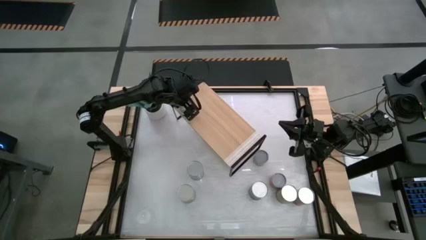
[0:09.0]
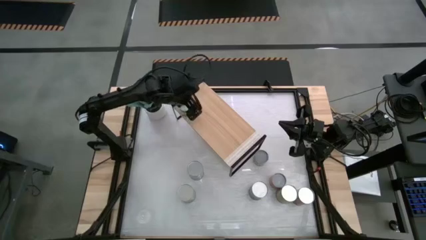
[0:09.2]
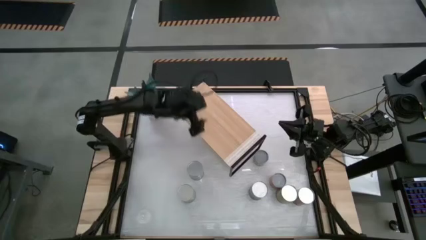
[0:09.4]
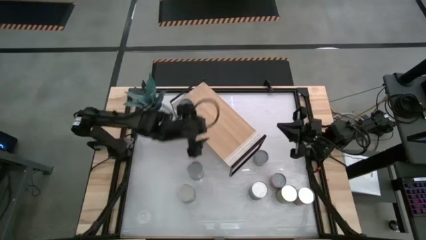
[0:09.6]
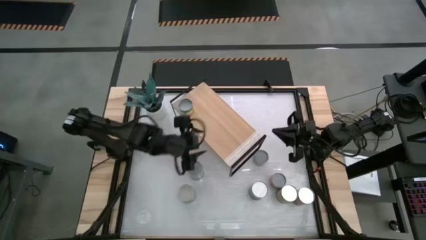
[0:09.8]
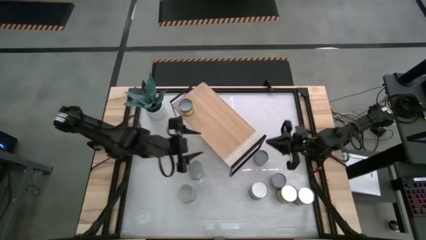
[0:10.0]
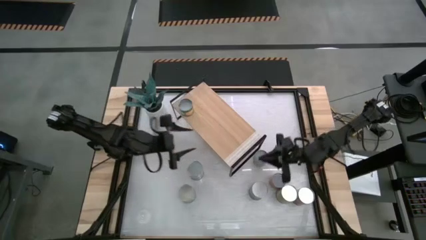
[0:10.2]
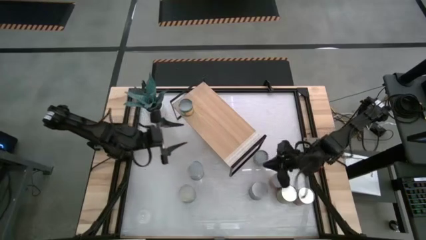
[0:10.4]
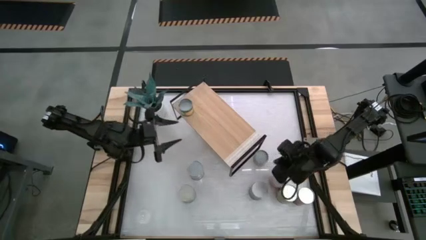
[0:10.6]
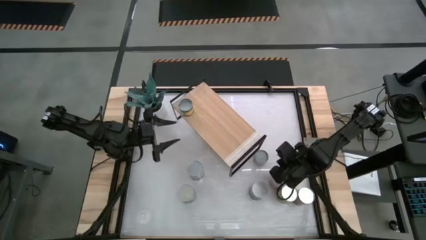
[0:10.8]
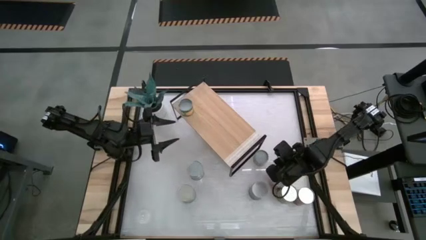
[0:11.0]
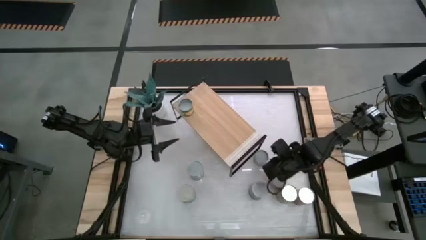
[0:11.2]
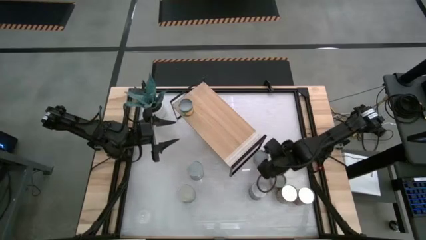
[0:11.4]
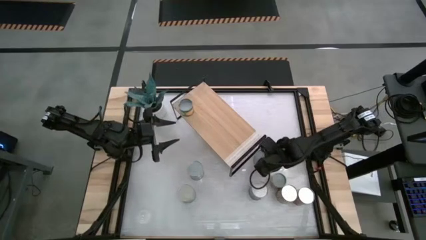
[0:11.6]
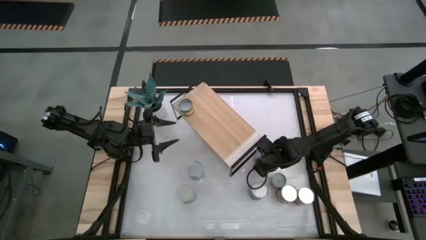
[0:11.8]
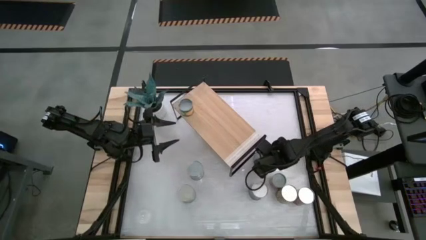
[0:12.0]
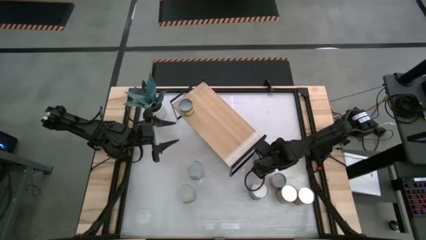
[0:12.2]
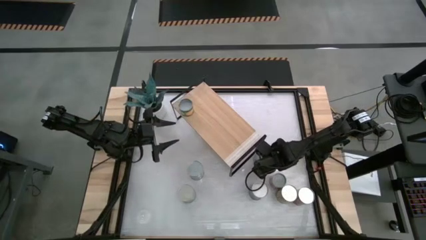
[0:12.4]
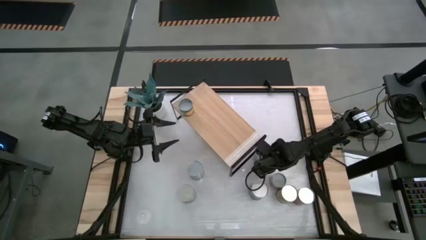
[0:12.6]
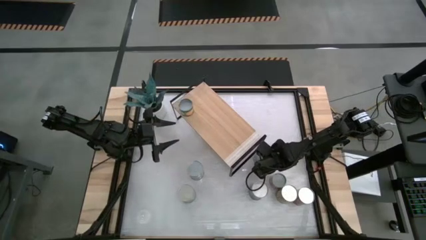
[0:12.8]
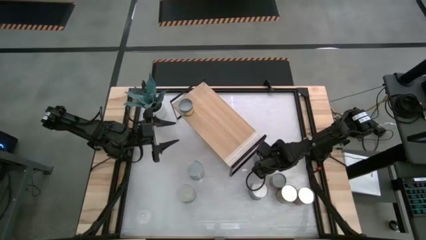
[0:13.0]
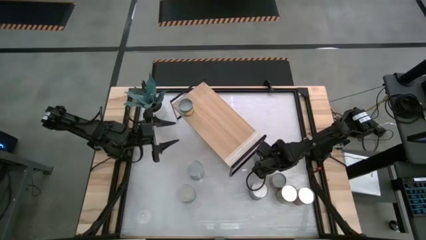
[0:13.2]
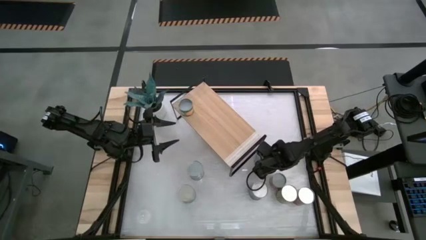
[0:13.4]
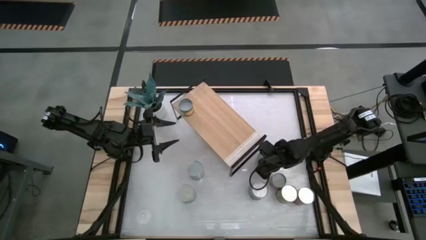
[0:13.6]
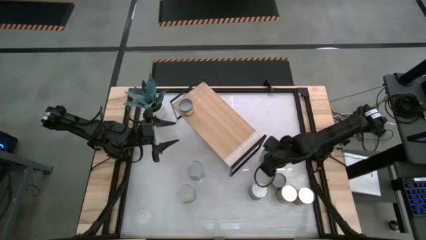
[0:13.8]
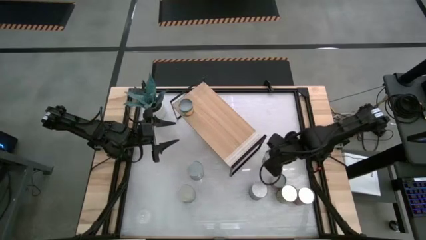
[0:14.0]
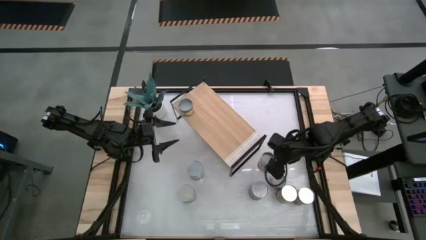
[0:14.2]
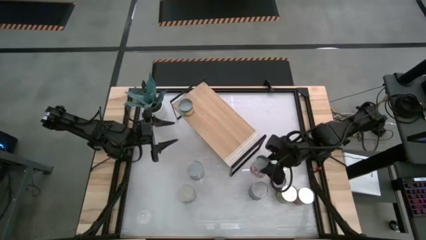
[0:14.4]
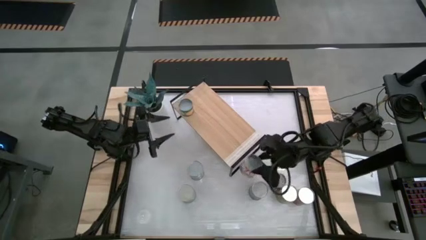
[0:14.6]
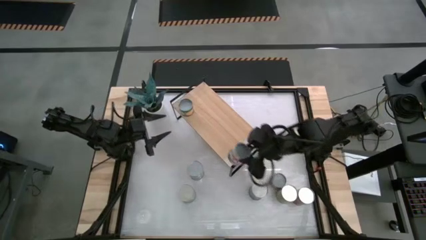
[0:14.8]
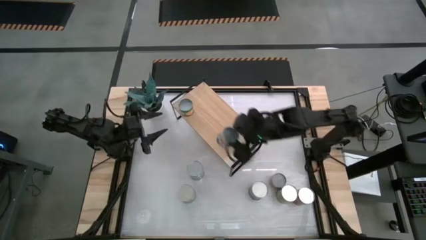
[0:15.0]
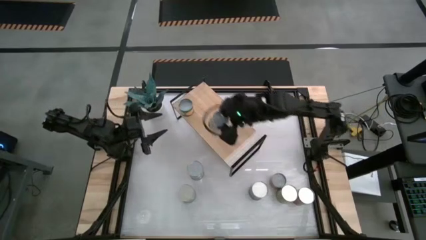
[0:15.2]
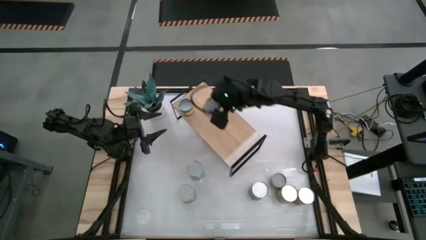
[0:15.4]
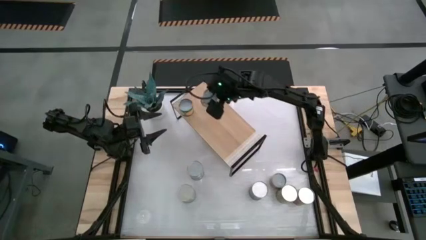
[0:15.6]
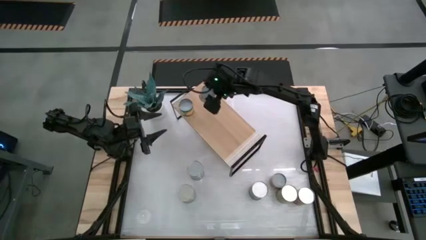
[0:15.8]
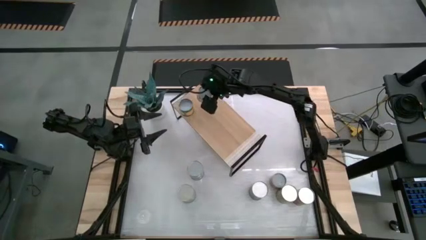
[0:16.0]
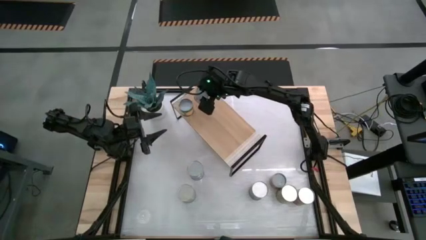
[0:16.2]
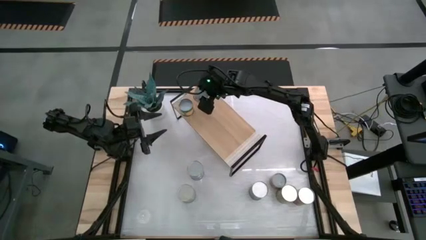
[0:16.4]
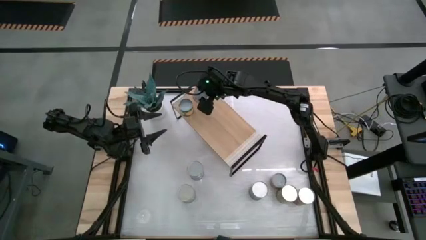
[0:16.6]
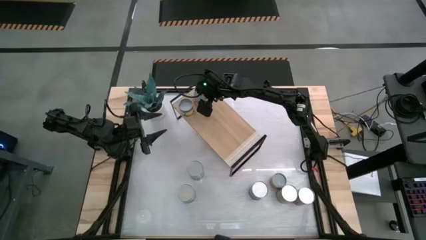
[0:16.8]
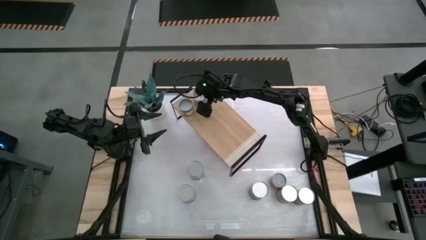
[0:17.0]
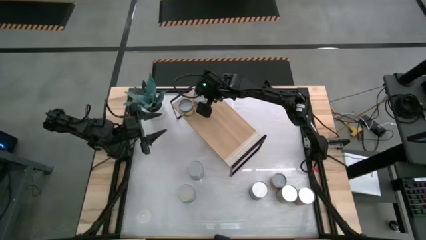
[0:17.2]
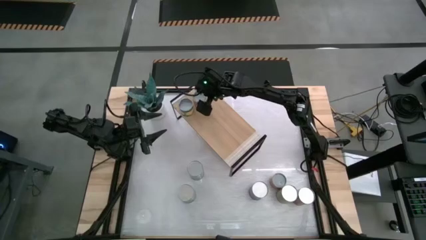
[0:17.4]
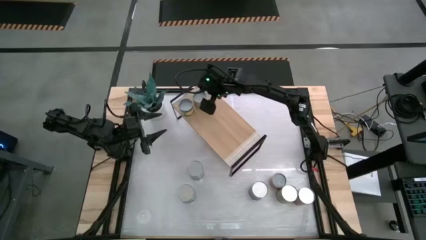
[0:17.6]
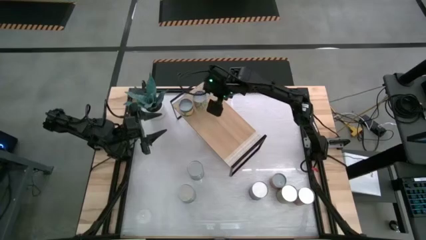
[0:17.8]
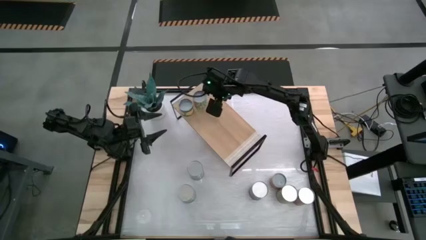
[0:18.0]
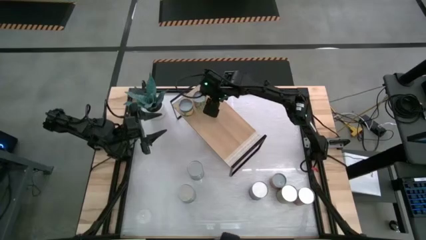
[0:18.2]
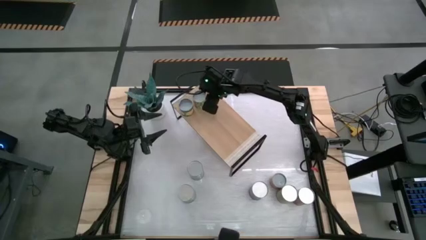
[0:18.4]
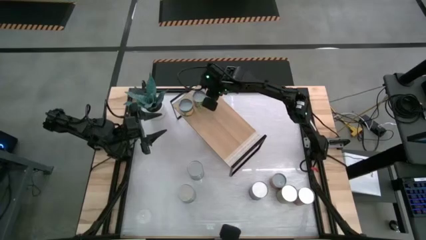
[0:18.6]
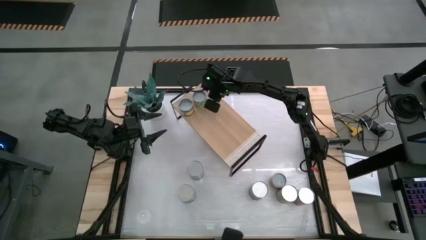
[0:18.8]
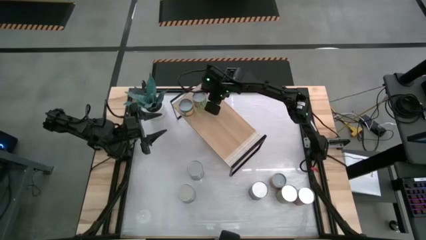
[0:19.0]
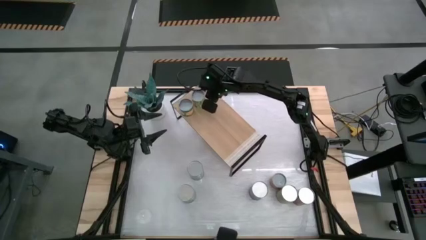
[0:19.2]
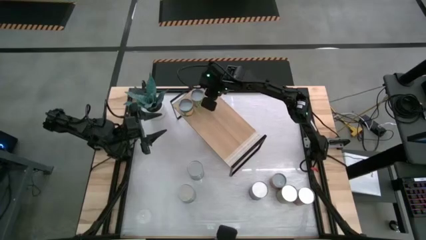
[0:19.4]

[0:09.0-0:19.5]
Task: Pick and place cans onto a shelf
Put the small canned peas on the shelf
